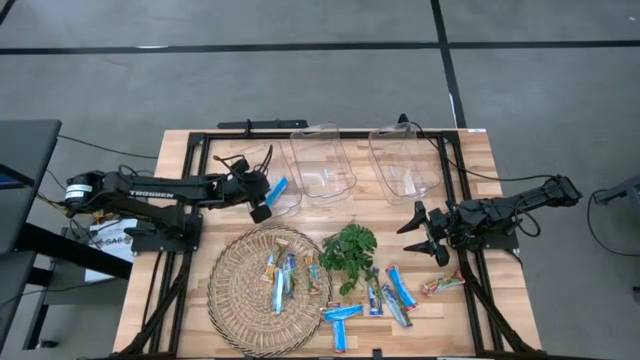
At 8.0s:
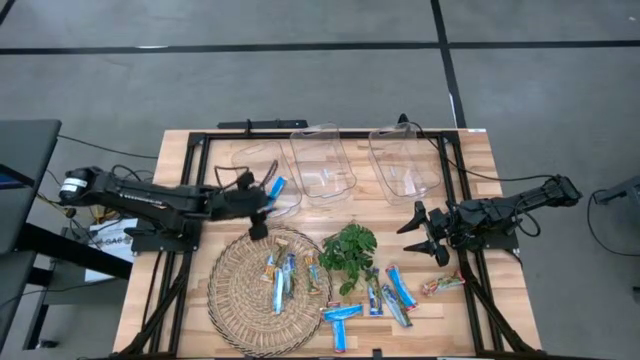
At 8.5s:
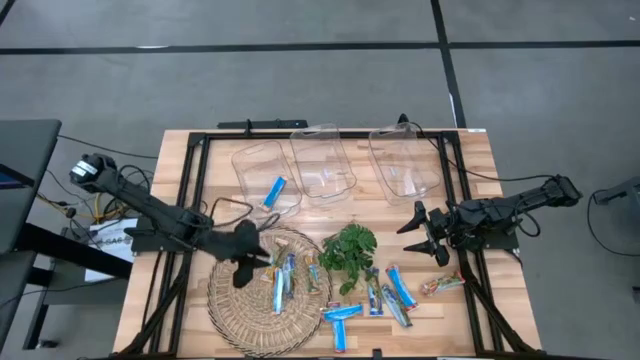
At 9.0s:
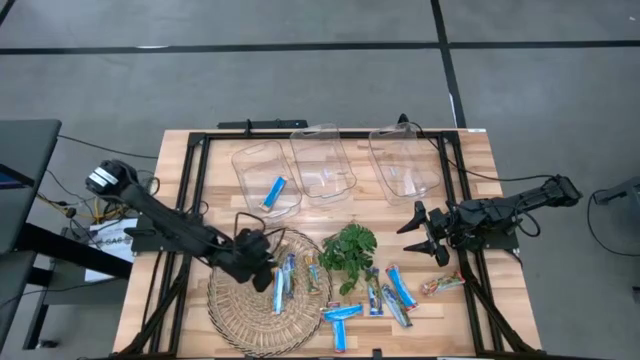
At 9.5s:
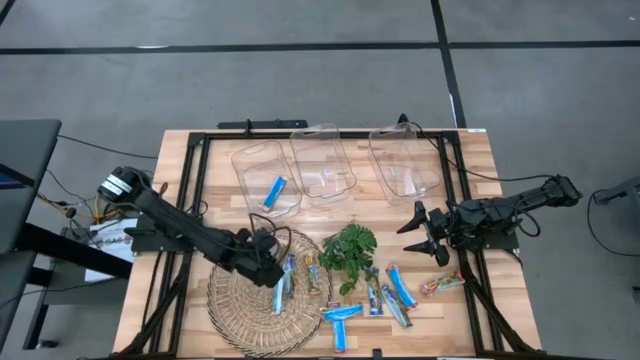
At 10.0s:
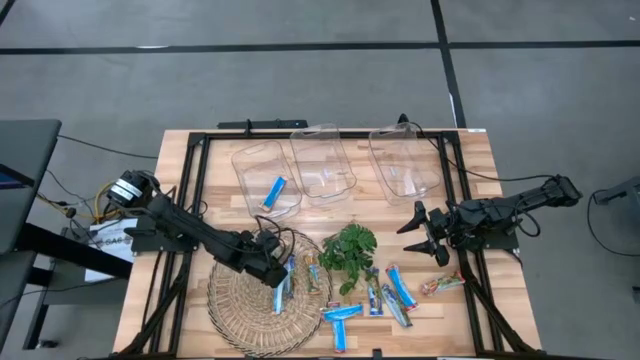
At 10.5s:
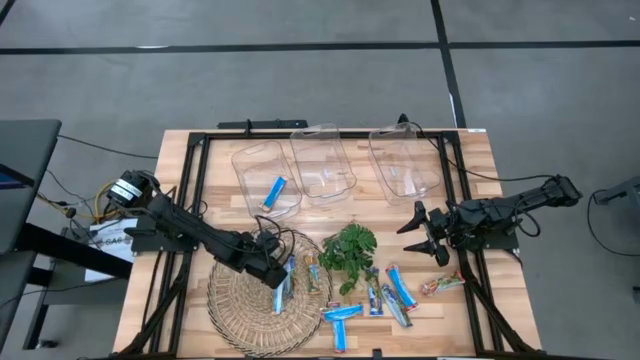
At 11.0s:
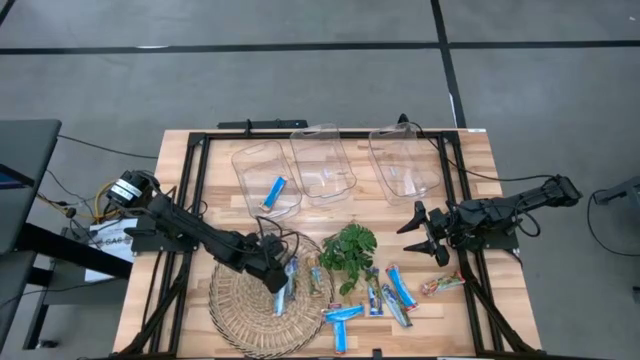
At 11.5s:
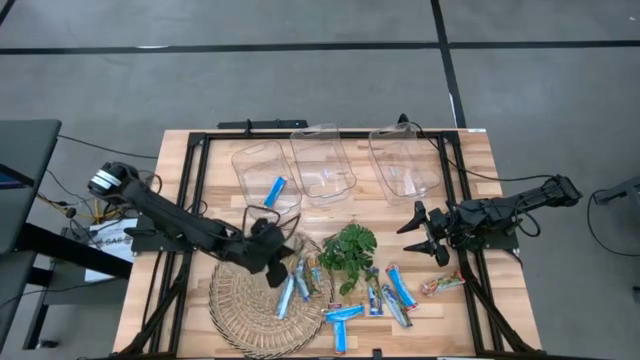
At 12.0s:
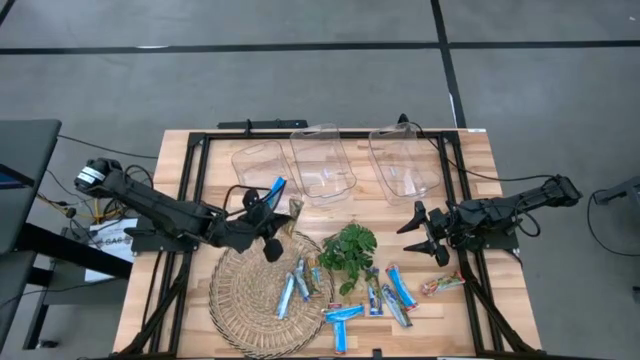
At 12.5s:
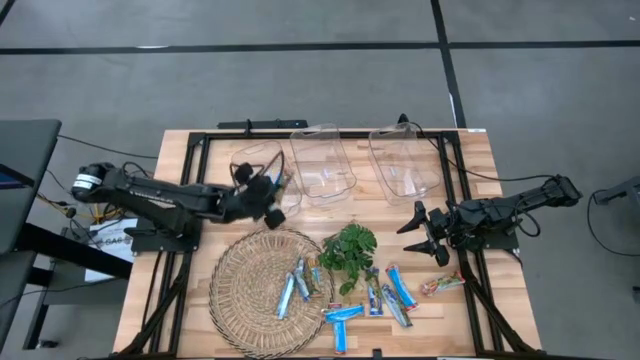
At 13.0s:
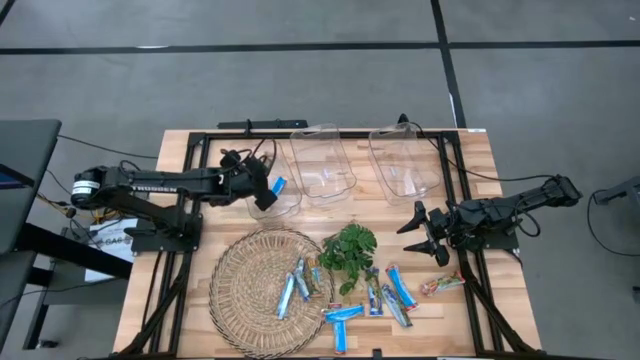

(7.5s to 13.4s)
Task: Pick and place Granola Bars by type
Put the yellow granola bar into the left transparent bin

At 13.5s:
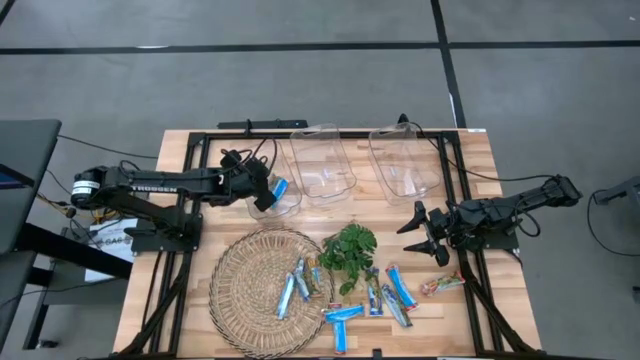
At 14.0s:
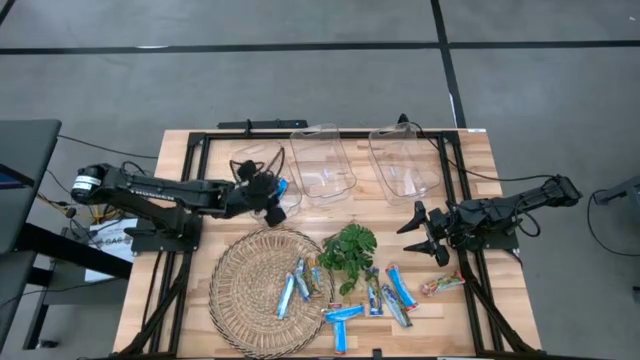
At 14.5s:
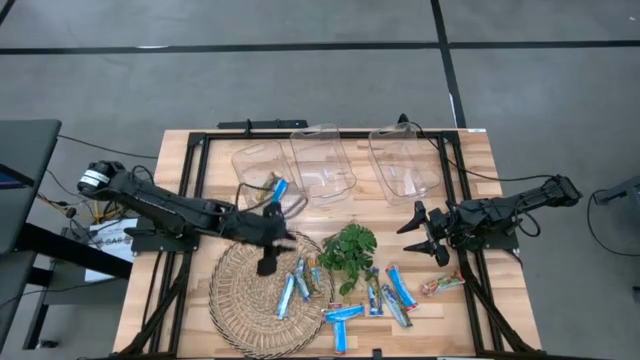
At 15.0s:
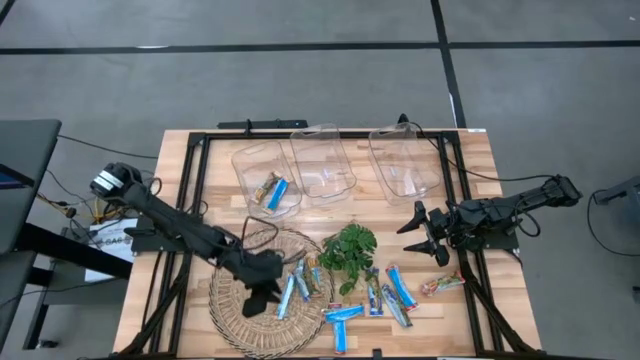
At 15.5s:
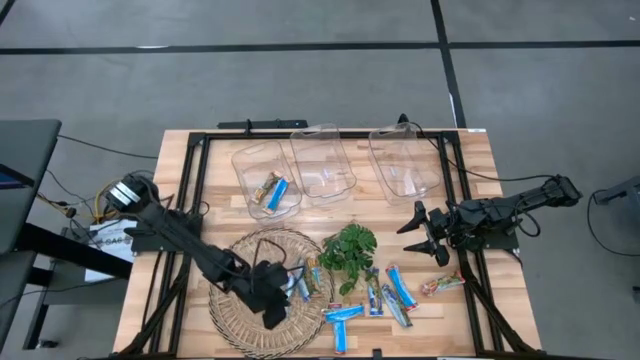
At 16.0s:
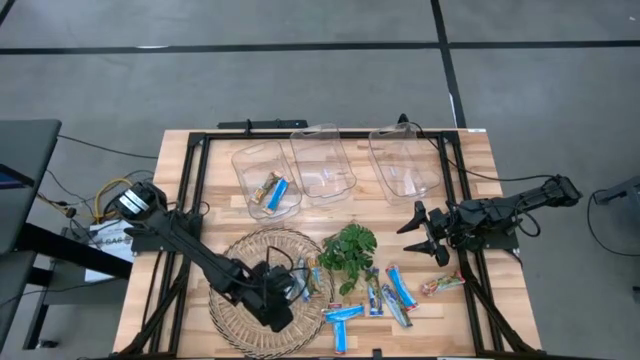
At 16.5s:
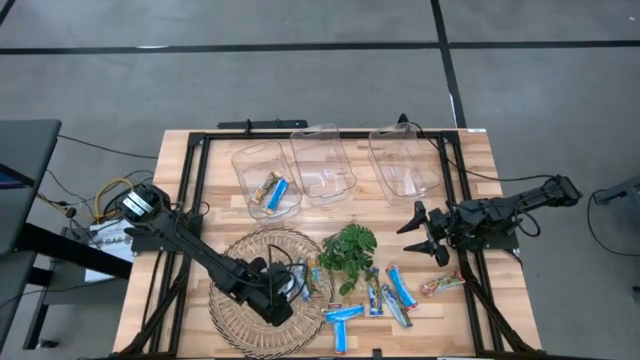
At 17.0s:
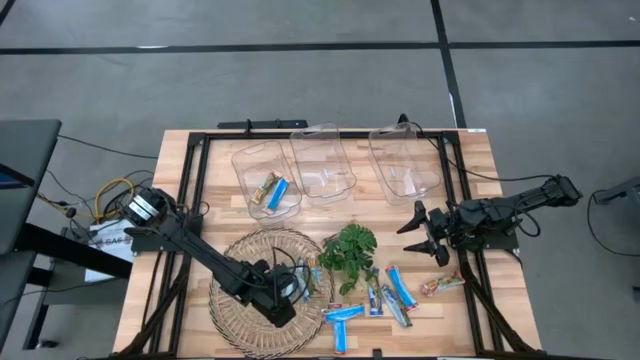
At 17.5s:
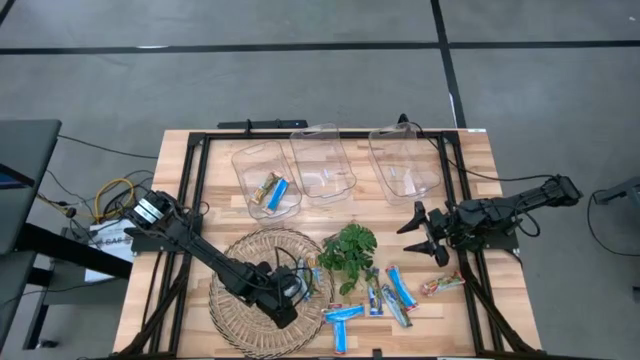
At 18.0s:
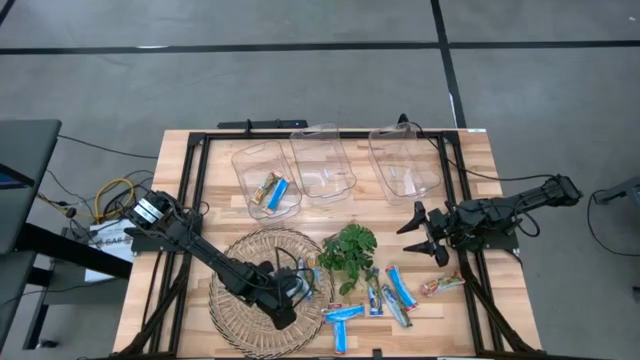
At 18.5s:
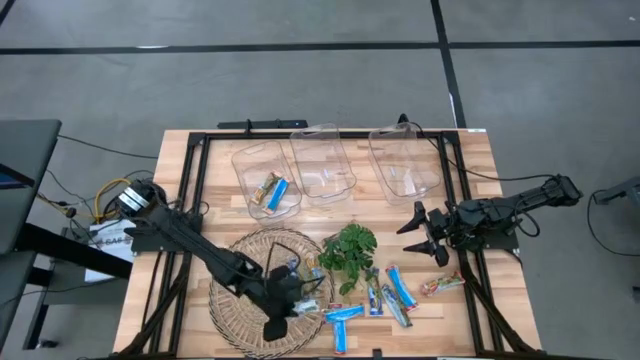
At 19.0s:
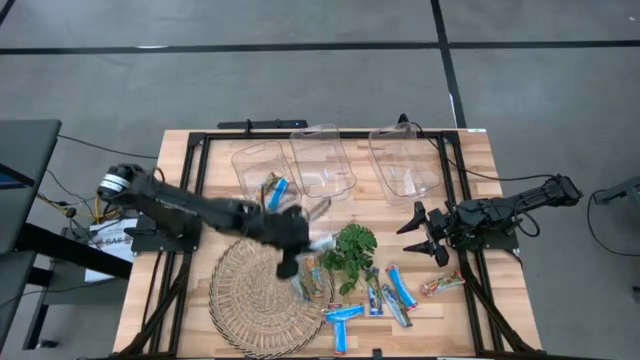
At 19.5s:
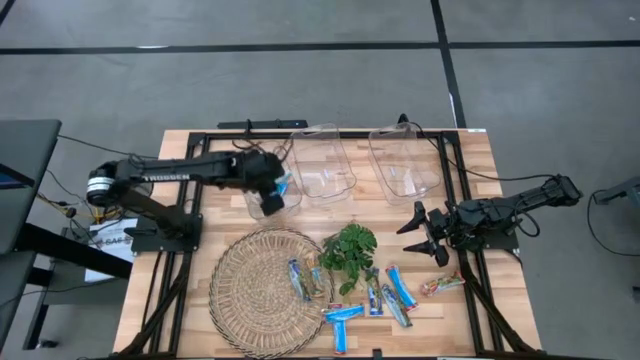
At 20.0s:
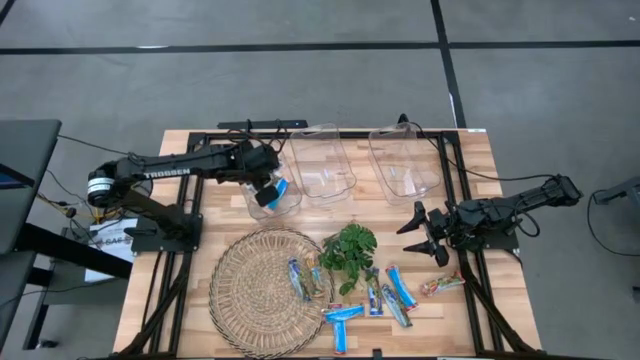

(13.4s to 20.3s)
Put the left yellow granola bar into the left transparent bin

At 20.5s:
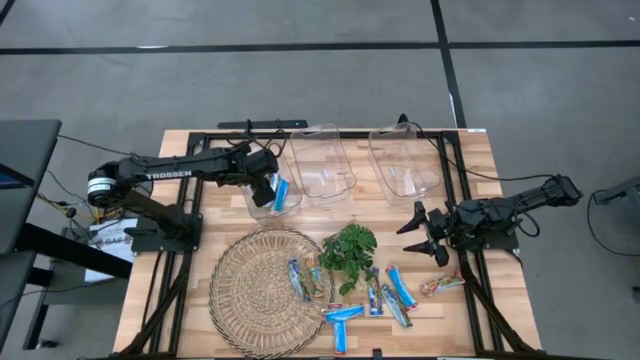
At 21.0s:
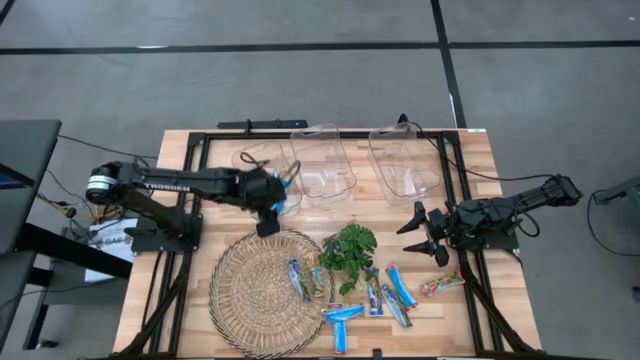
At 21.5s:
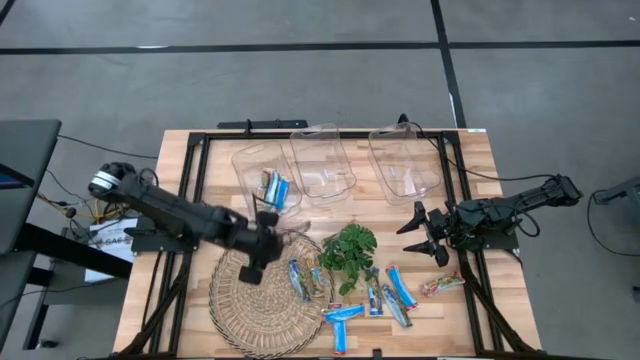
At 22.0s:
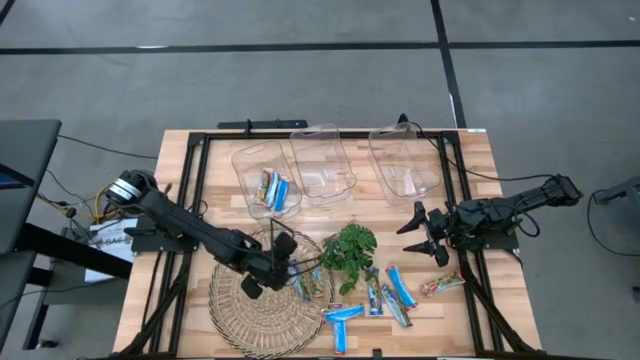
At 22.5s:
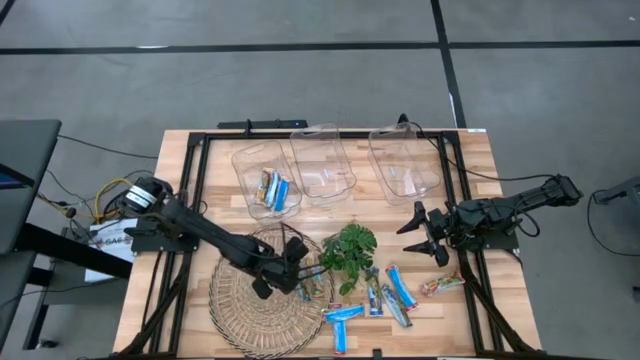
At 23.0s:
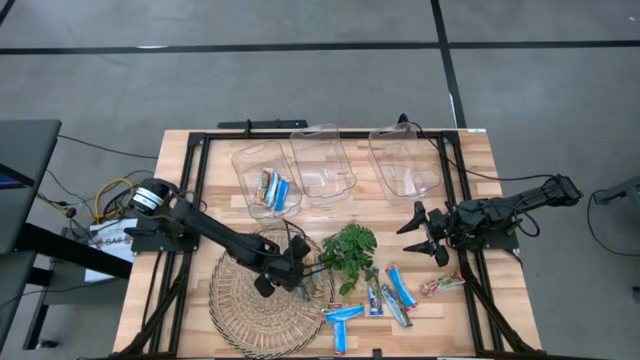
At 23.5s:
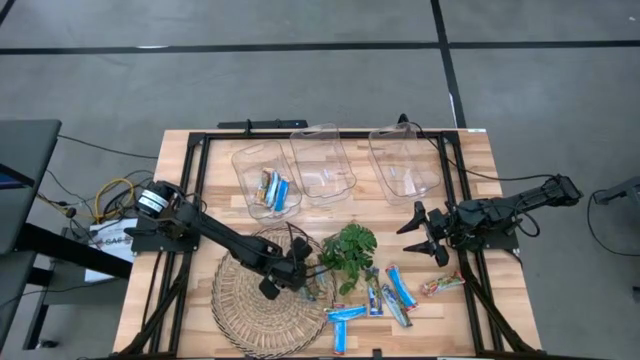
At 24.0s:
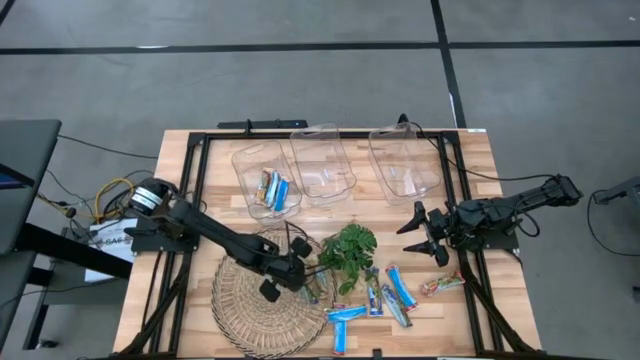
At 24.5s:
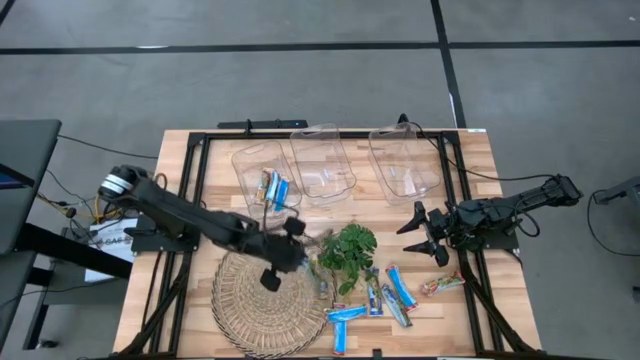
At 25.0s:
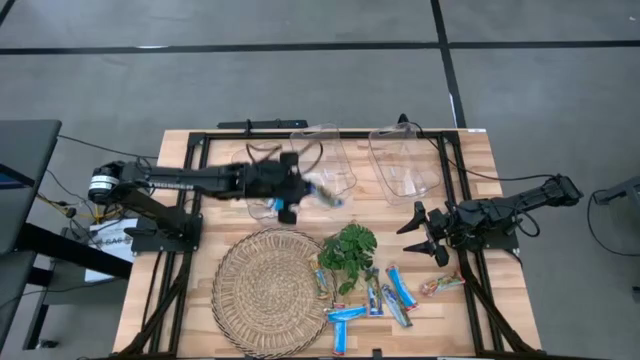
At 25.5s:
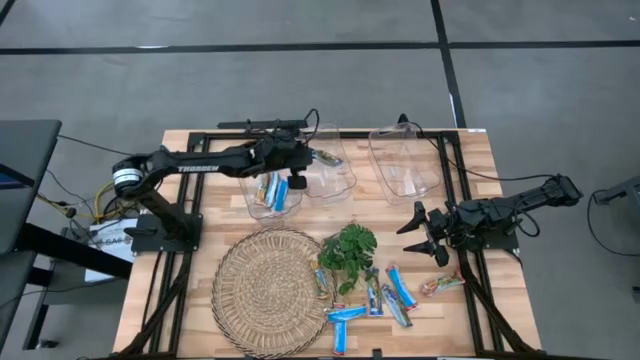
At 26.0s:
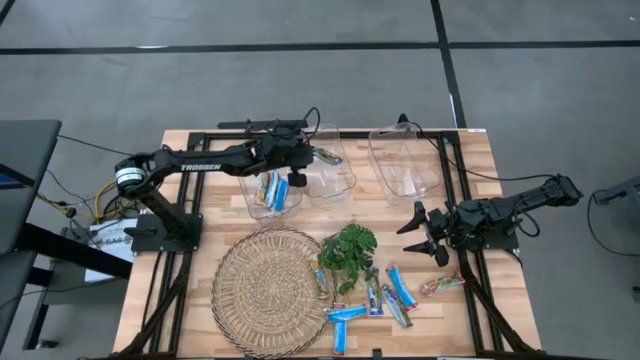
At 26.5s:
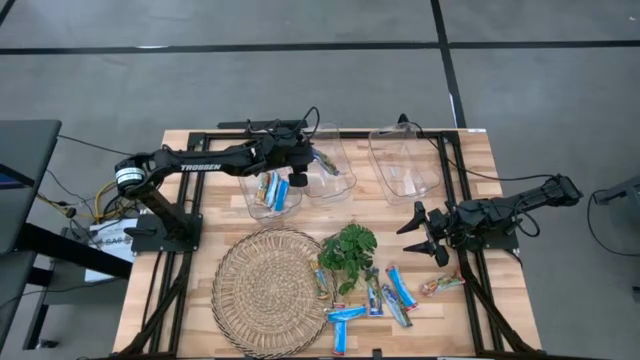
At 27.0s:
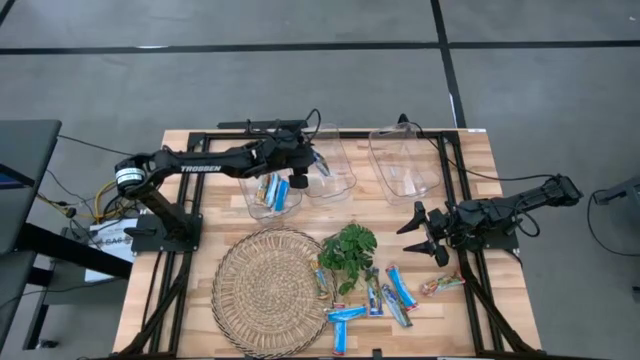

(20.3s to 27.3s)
Put the left blue granola bar into the middle transparent bin

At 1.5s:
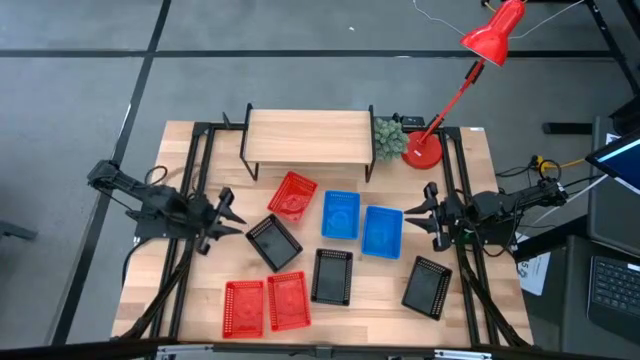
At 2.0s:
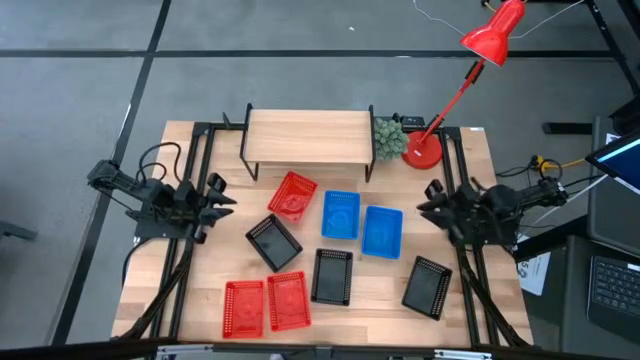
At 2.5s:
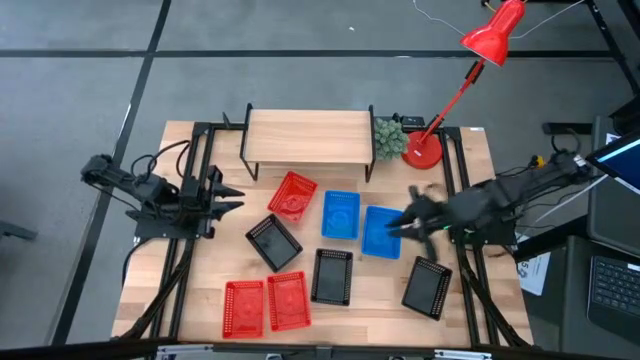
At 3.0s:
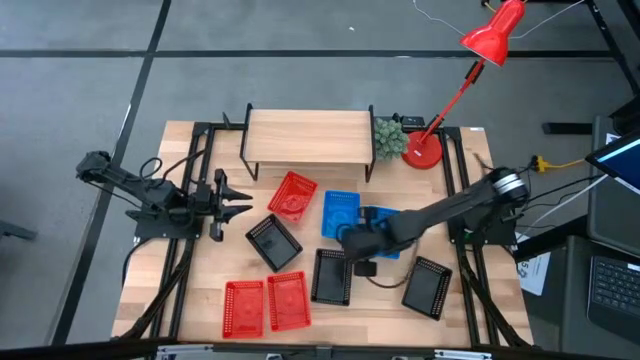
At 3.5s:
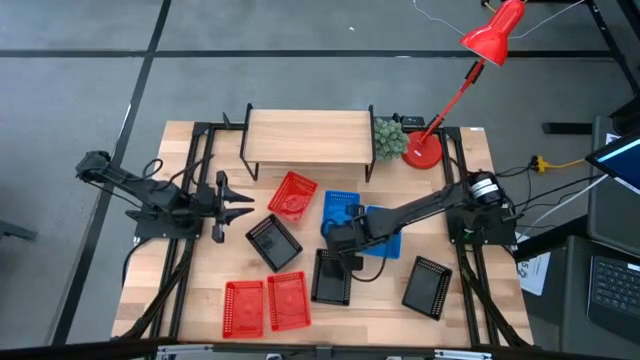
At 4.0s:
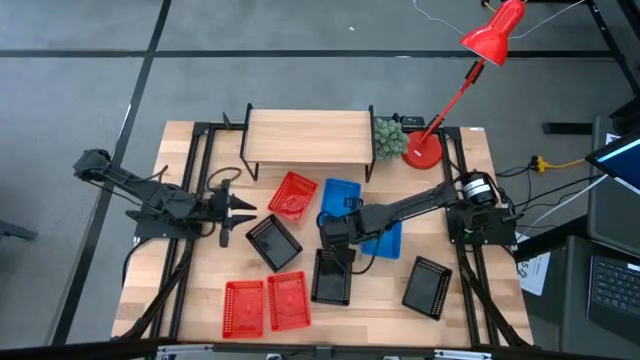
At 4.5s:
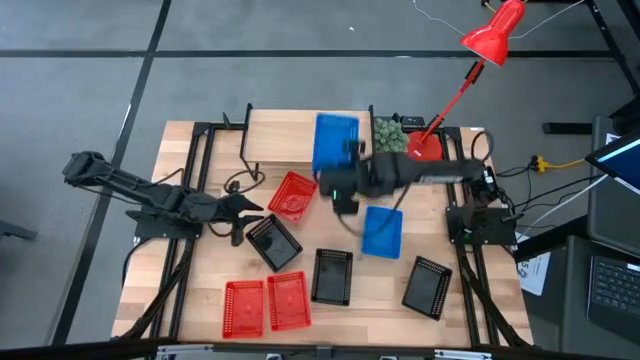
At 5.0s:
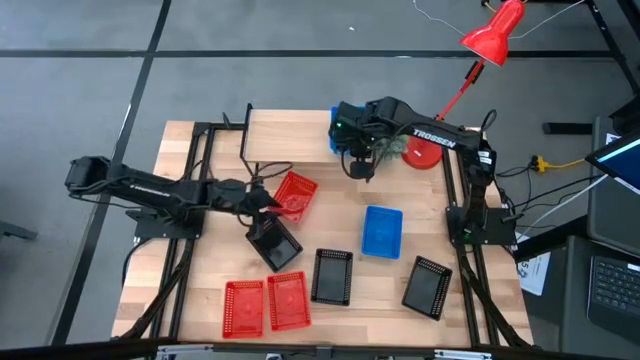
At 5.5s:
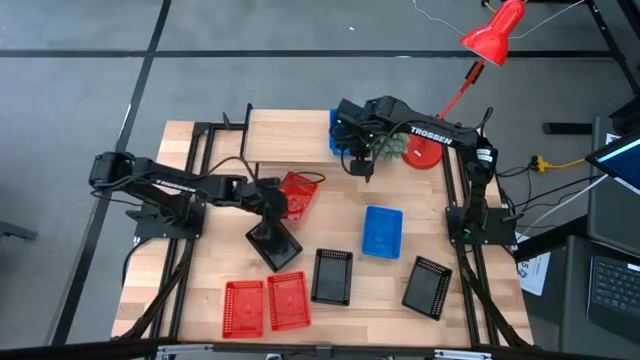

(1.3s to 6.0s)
Task: Stack baskets on shelf by color
Put the left blue bin on the shelf
